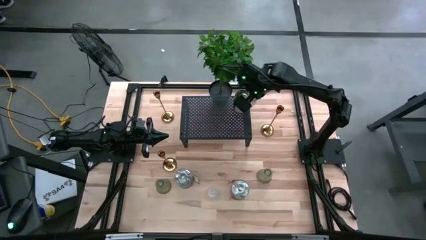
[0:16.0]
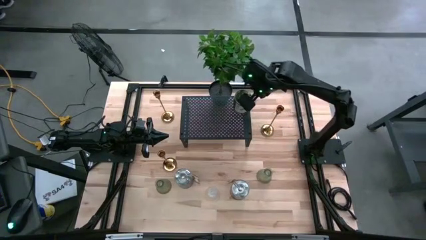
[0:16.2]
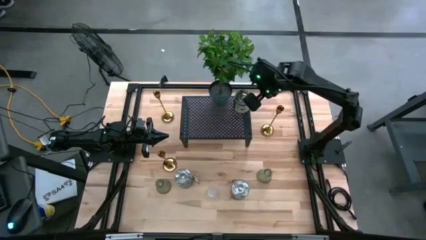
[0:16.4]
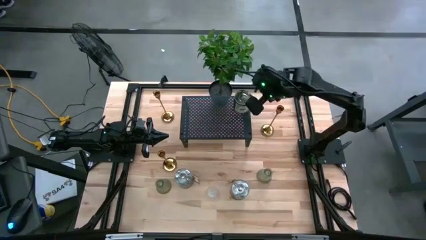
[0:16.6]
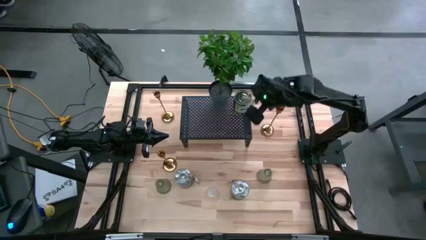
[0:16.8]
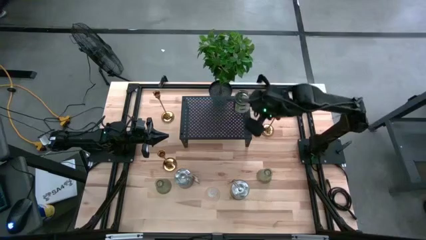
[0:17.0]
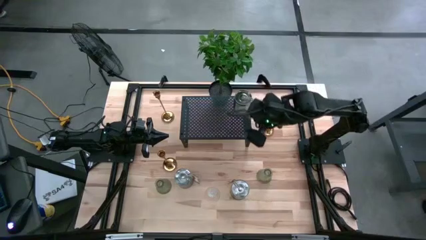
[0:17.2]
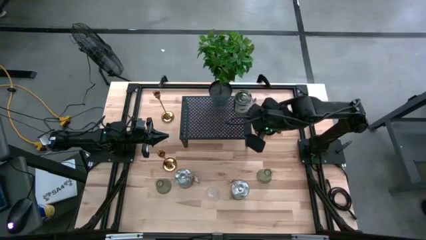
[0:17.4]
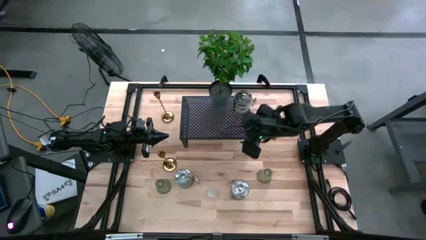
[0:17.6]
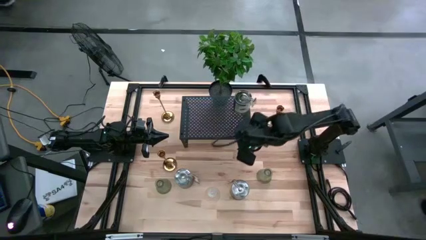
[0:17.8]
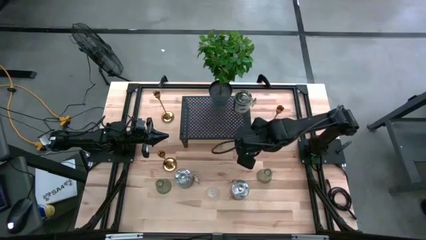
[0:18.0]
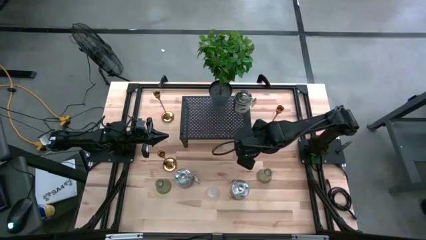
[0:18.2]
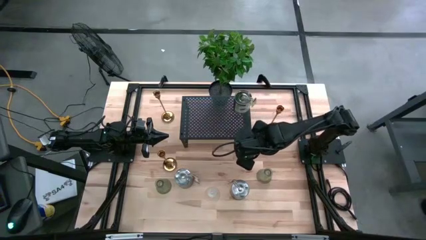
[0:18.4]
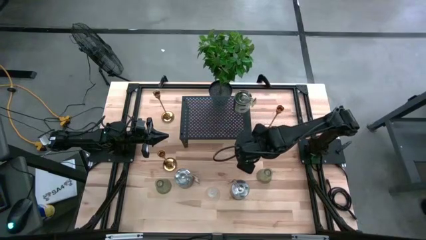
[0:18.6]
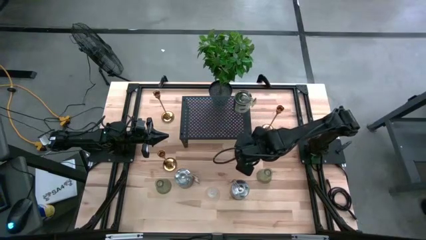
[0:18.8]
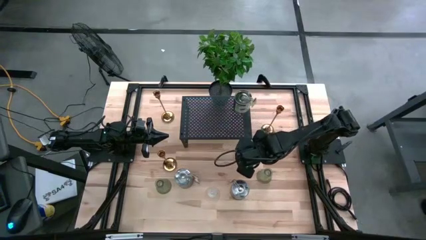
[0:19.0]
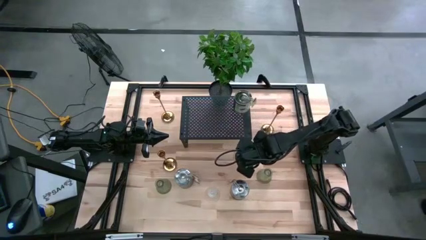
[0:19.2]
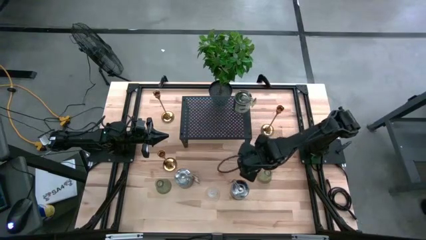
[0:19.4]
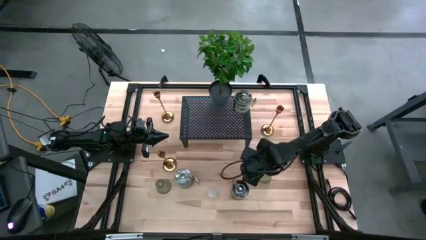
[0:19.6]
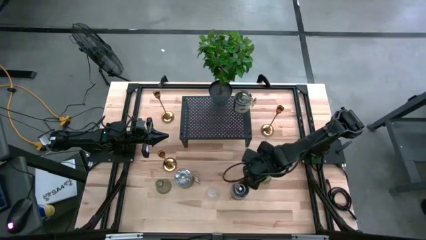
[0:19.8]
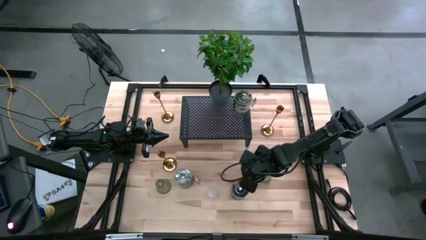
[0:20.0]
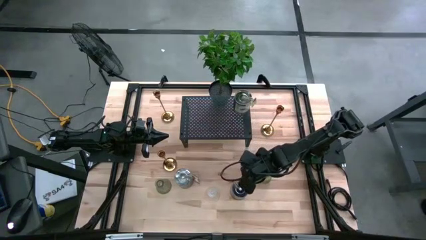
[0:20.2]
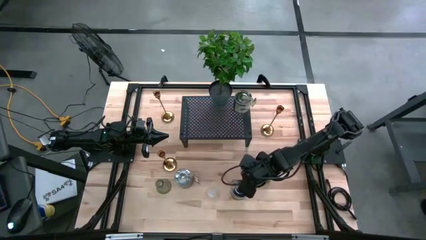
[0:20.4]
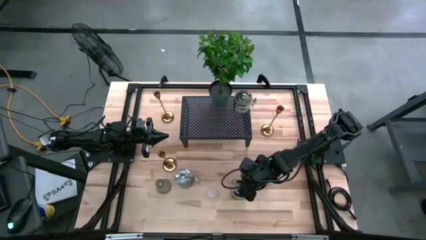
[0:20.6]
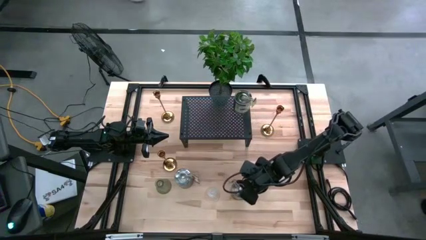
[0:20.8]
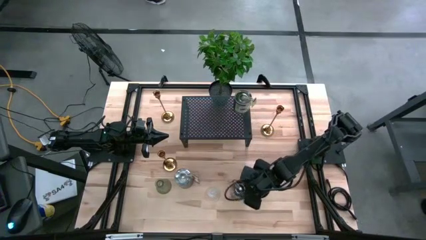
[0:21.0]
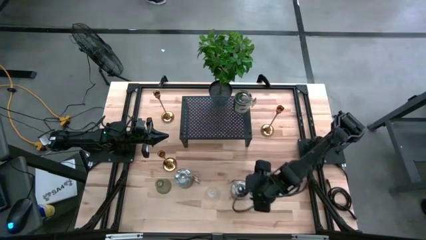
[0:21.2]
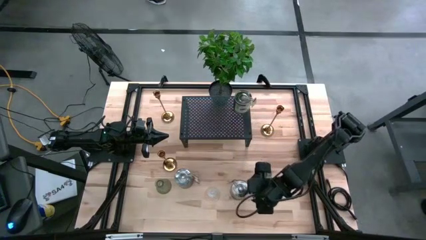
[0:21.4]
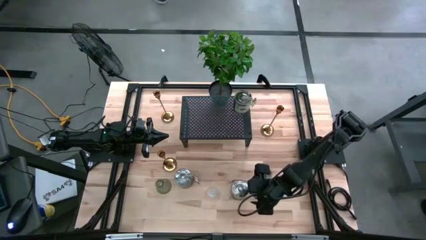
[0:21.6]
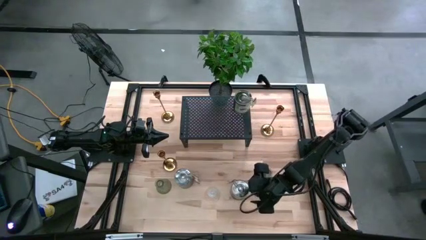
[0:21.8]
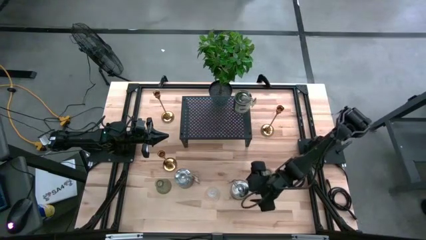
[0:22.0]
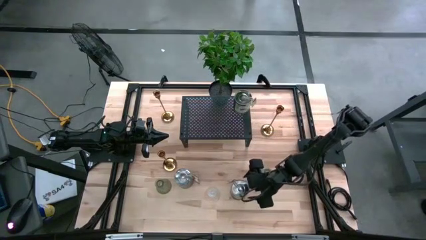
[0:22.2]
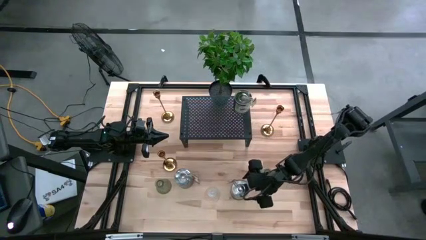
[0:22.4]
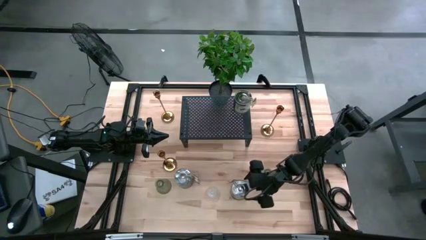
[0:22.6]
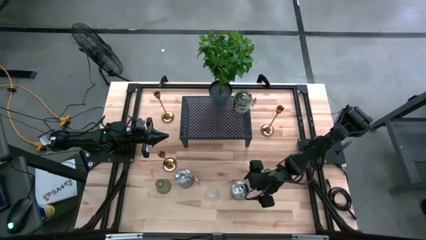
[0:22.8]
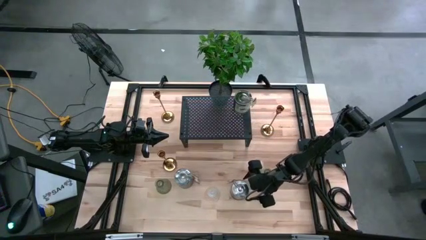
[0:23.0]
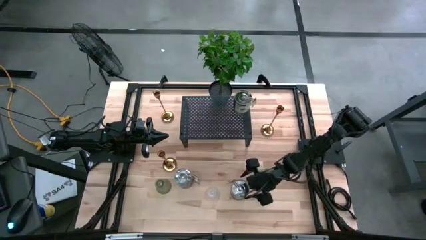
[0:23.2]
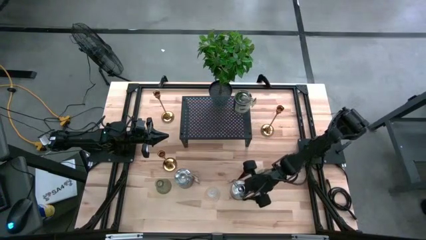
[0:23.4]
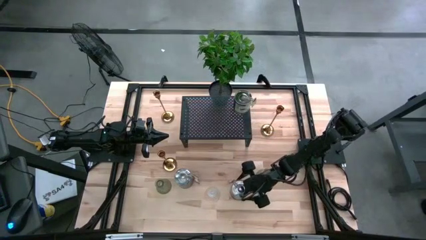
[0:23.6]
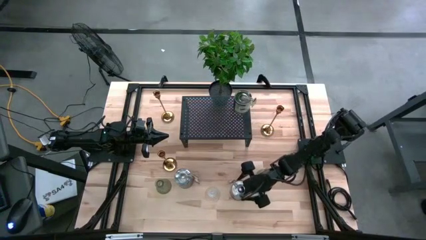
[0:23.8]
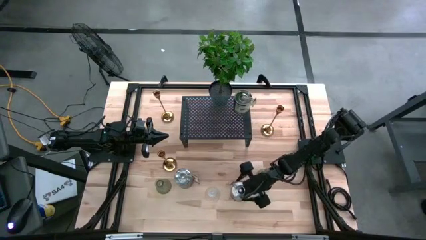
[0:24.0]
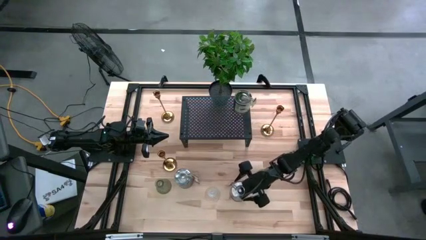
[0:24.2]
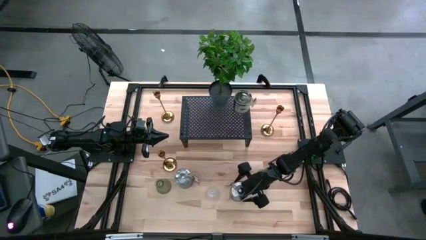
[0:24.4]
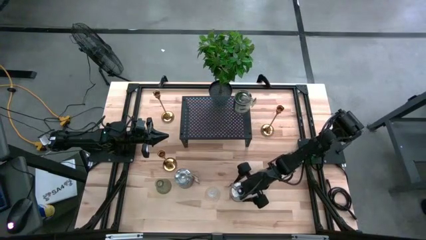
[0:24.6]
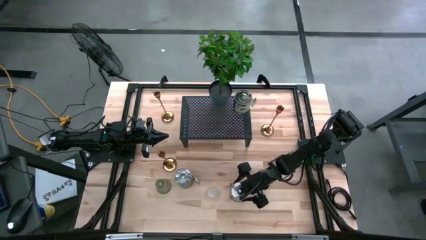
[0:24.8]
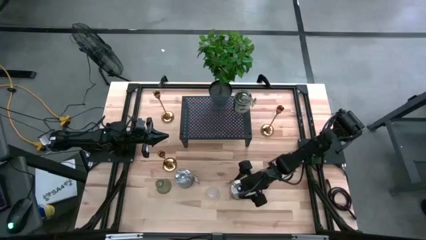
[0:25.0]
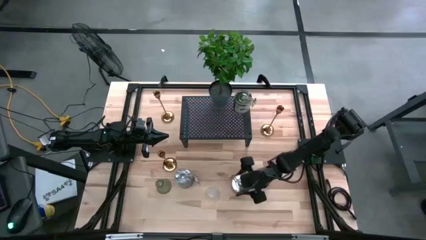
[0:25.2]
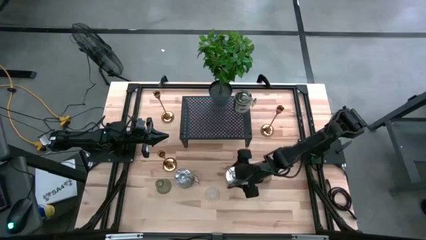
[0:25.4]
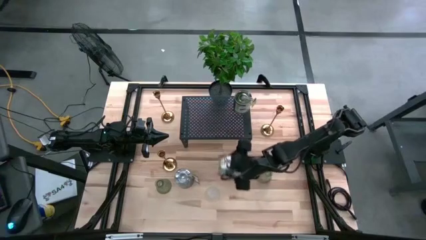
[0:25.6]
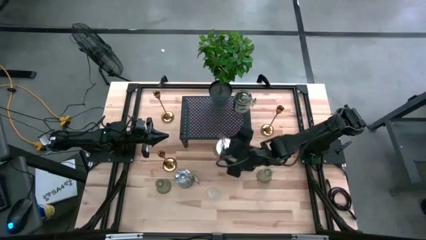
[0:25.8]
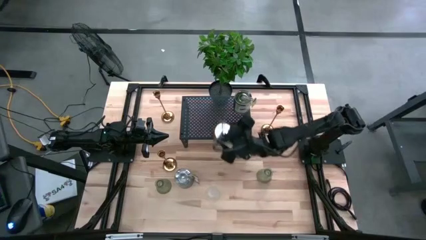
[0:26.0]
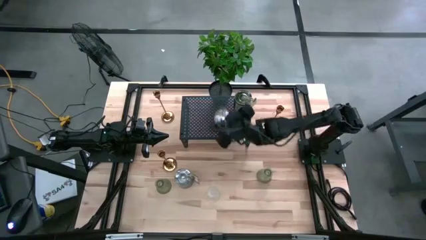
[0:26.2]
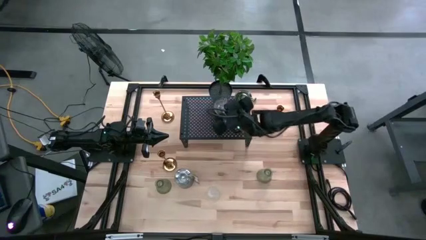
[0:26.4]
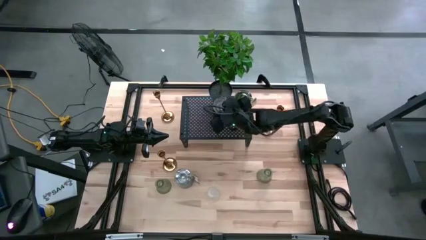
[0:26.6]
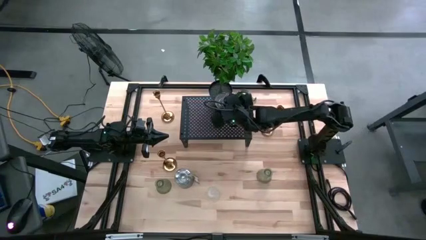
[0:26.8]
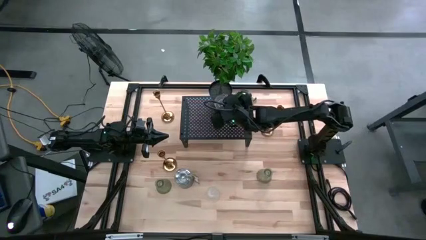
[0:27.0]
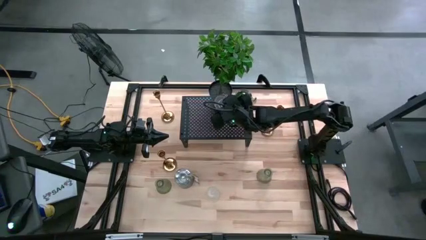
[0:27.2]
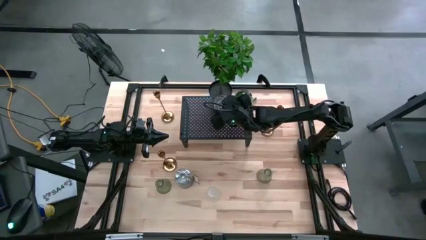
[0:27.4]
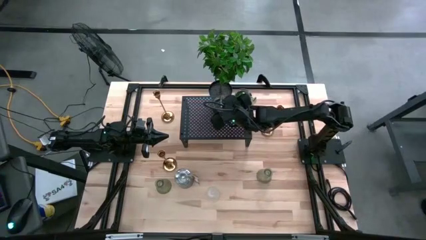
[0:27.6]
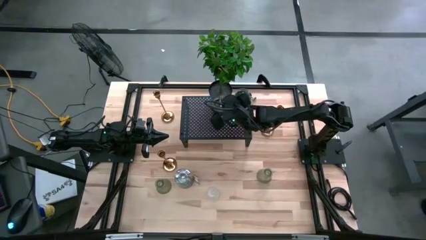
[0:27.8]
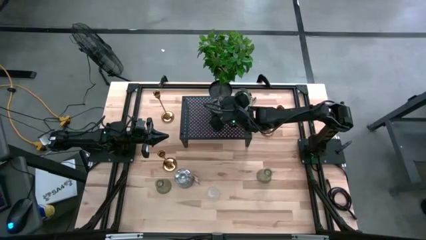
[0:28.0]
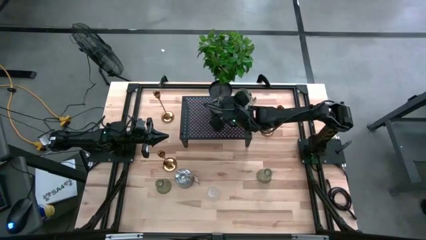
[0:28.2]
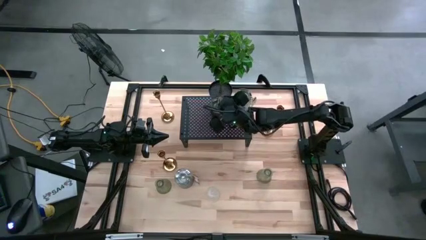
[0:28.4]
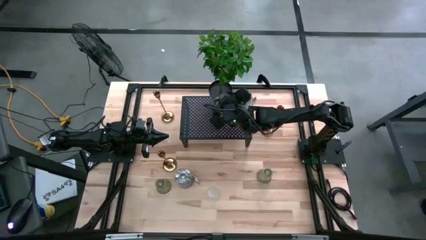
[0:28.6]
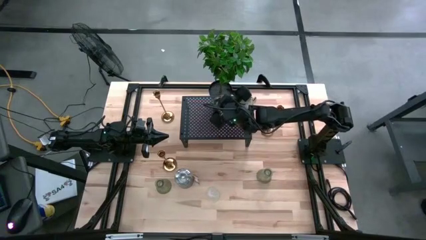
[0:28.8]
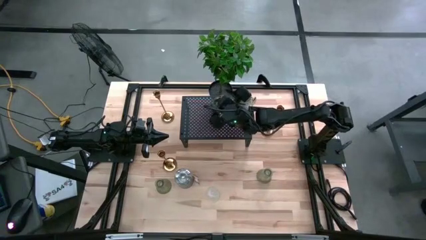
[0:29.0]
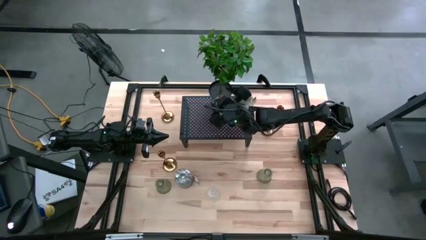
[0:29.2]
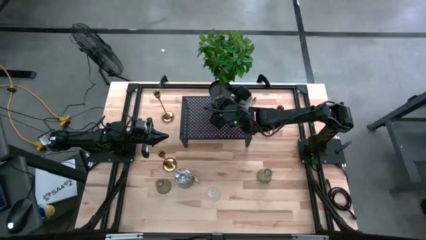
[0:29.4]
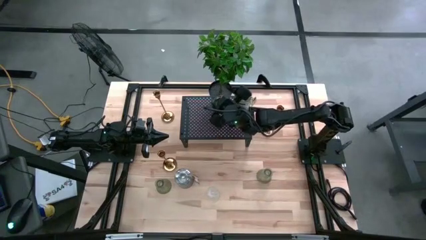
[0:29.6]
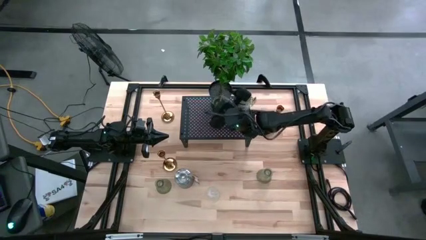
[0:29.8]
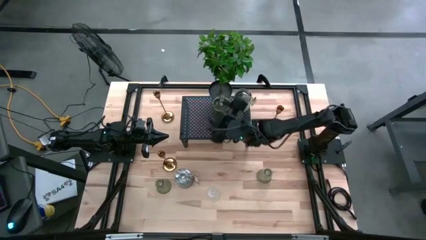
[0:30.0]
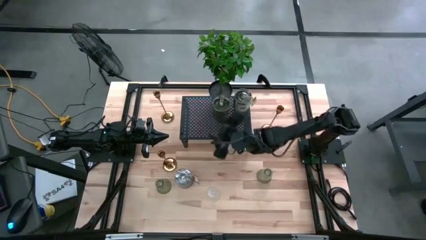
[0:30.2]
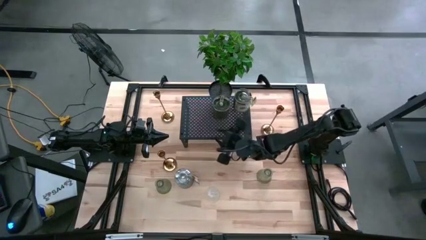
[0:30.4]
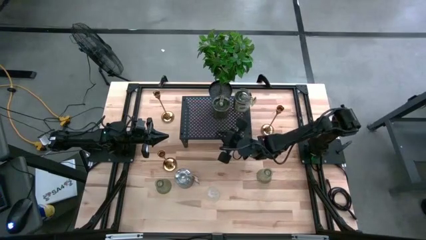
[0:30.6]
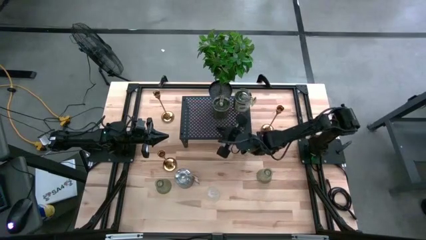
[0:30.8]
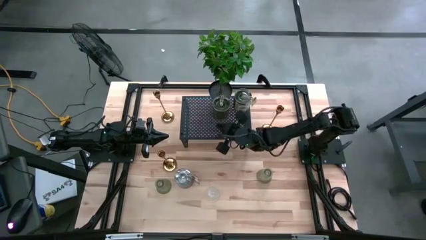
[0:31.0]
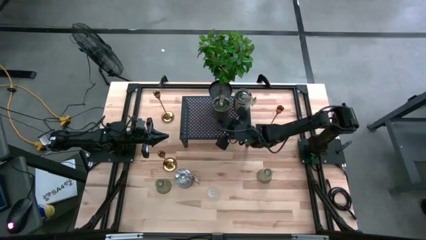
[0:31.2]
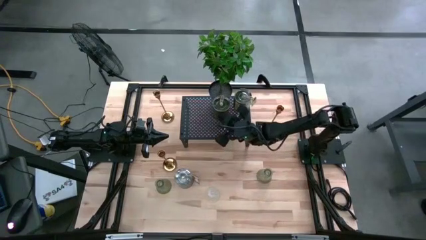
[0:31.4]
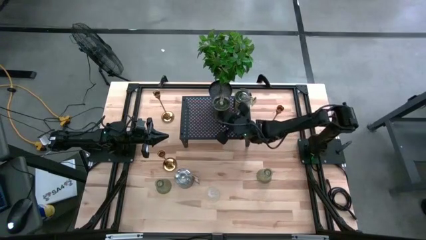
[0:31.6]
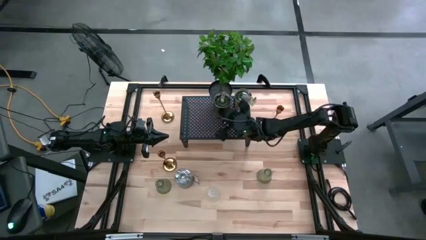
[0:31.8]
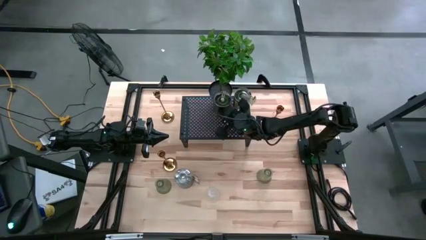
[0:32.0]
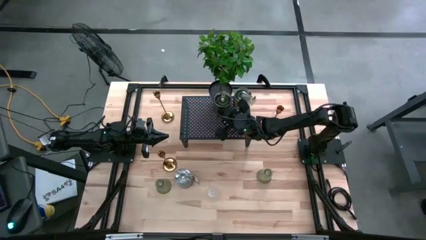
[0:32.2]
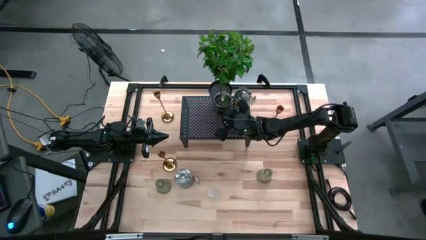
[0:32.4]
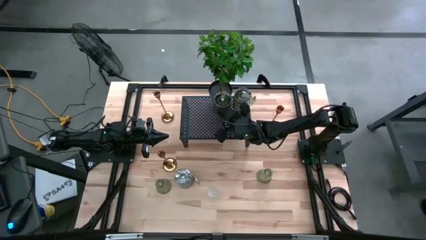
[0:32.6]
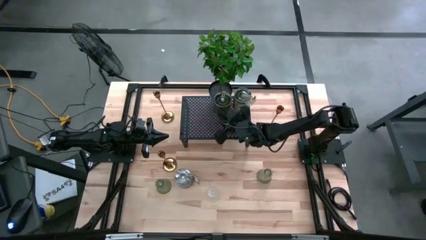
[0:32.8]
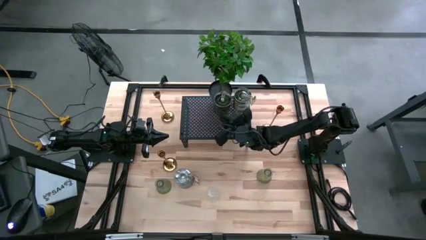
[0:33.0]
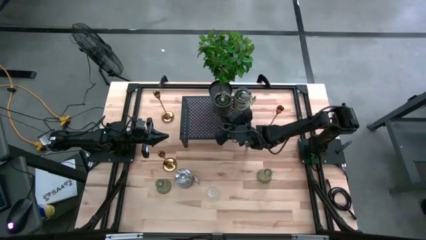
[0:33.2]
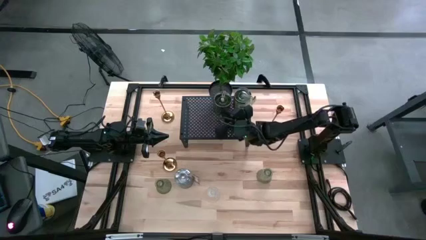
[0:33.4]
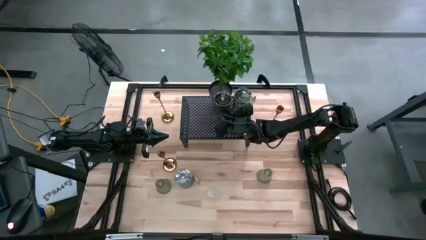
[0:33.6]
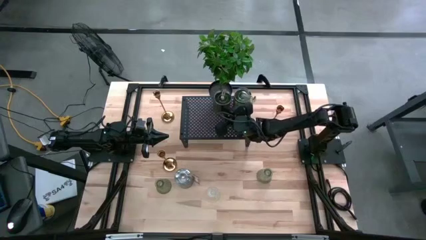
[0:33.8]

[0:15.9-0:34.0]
Task: Pick & Place candle stick holders
Put the right silver scented candle on the shelf aligned with the other silver scented candle
